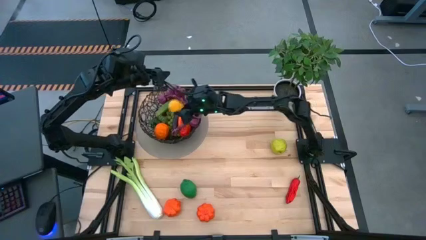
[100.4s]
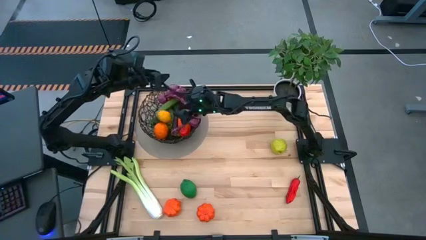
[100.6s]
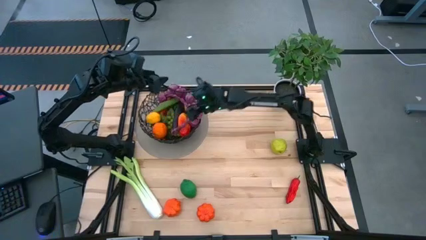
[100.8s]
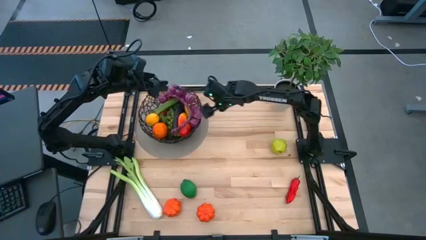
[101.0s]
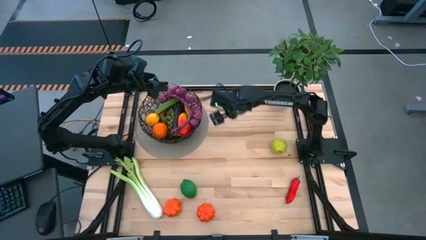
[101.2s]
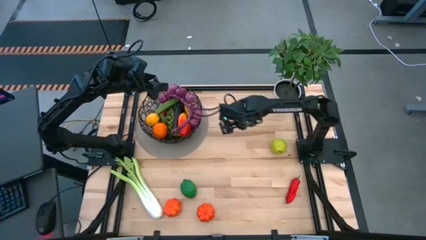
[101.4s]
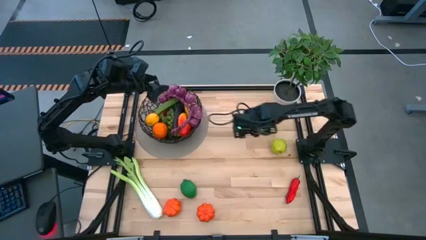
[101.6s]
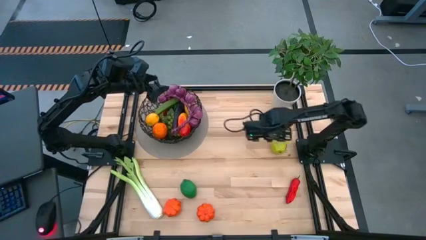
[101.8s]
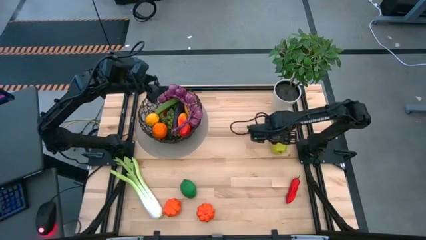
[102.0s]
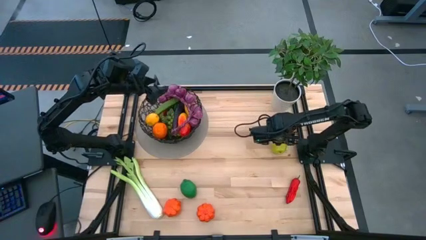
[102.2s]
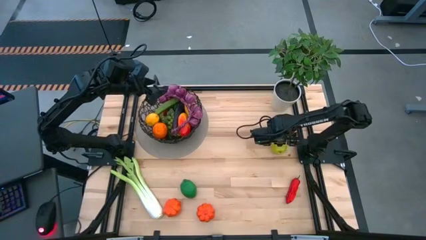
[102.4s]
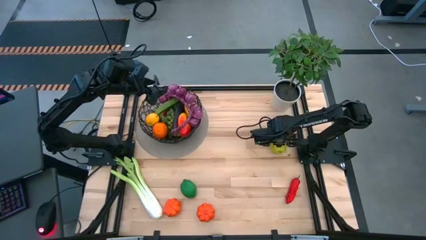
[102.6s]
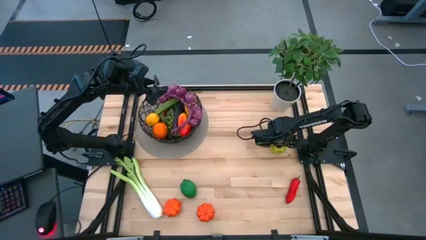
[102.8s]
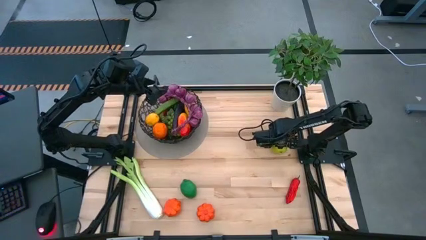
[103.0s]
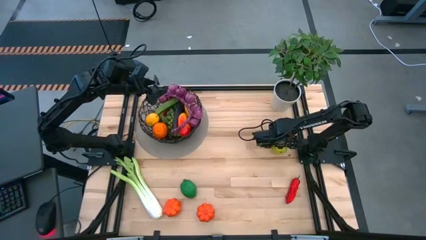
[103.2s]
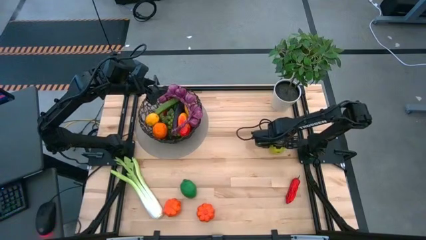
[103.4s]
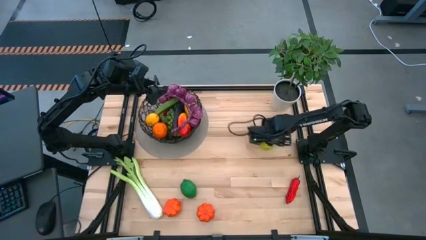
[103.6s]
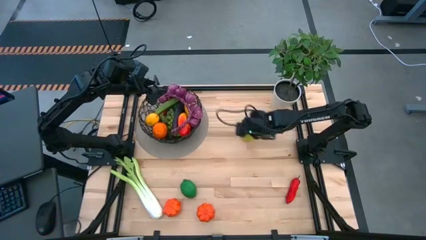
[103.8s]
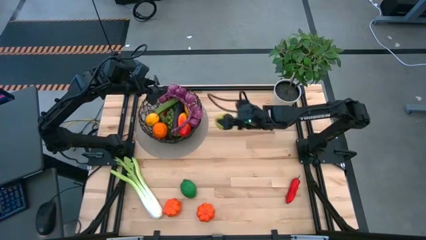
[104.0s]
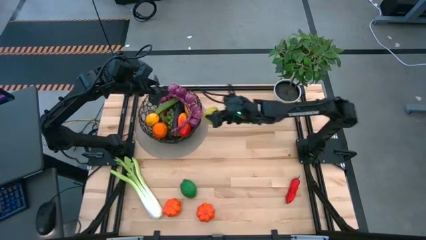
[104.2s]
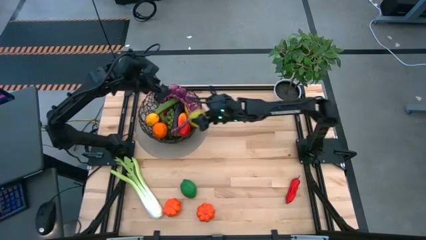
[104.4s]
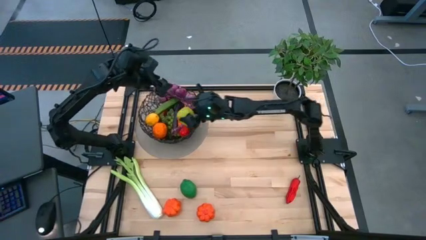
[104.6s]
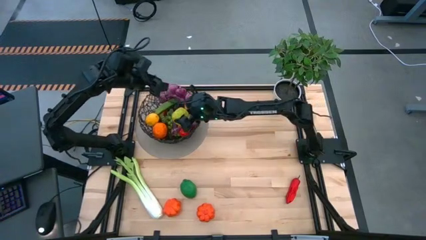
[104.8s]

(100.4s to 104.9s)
Task: Build produce basket
Put the green apple into the black wire basket

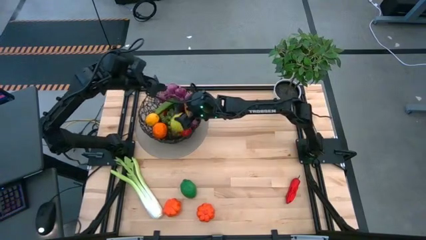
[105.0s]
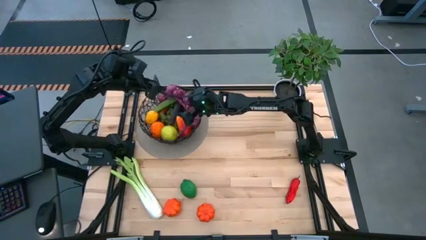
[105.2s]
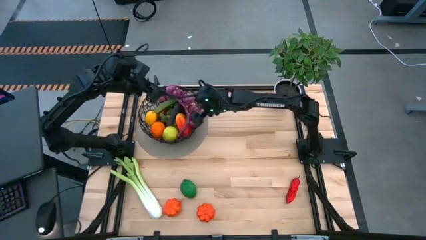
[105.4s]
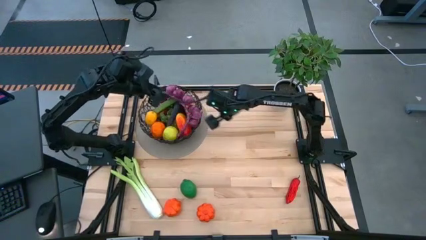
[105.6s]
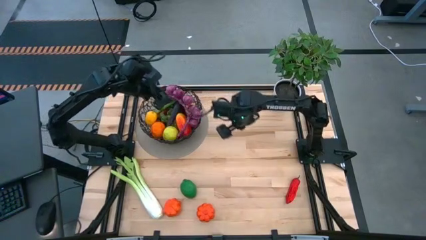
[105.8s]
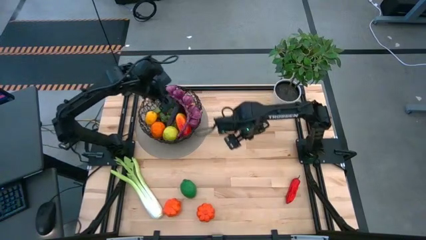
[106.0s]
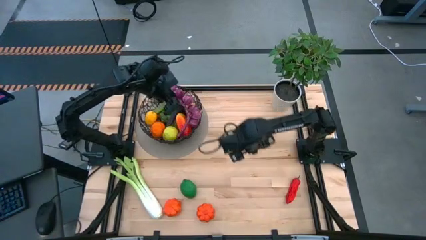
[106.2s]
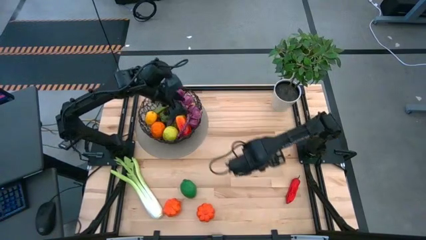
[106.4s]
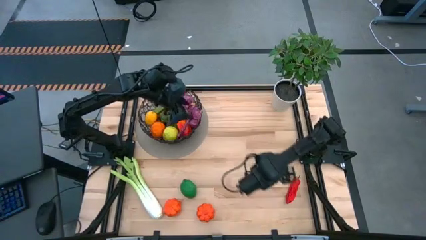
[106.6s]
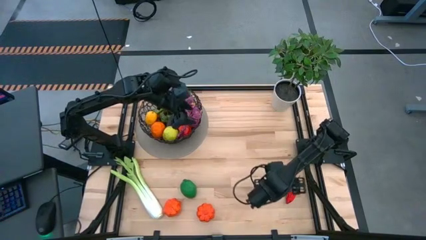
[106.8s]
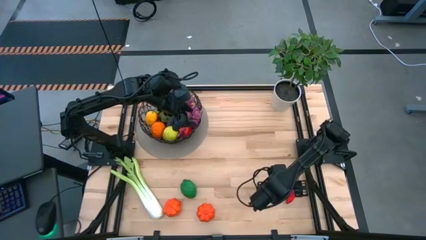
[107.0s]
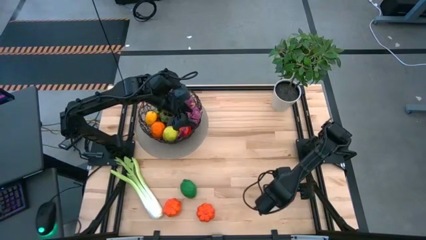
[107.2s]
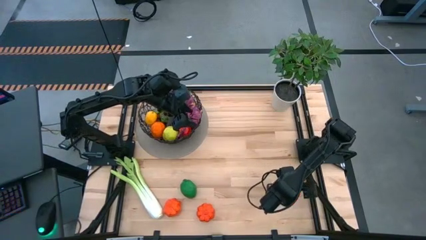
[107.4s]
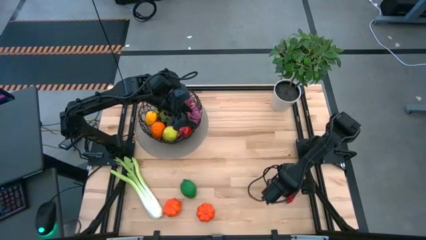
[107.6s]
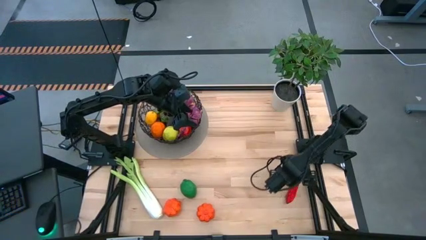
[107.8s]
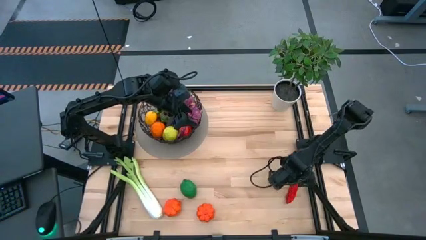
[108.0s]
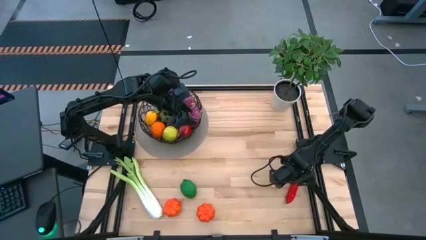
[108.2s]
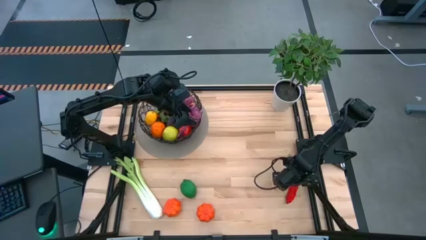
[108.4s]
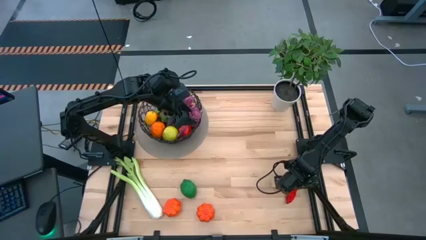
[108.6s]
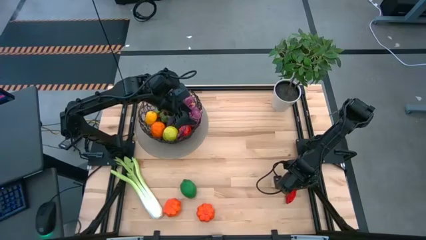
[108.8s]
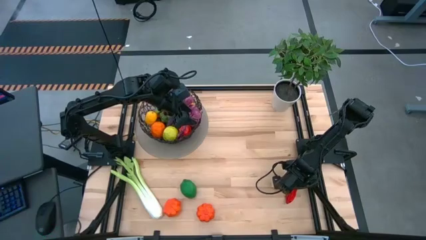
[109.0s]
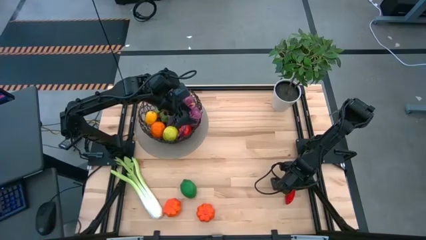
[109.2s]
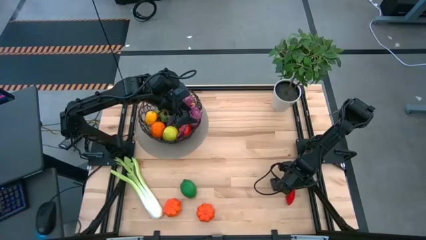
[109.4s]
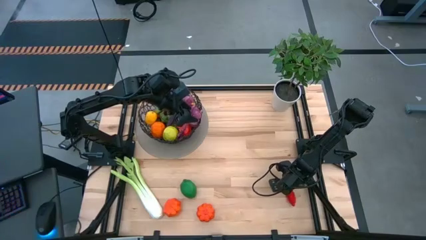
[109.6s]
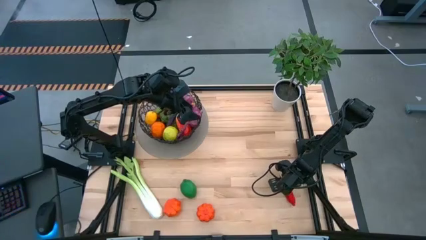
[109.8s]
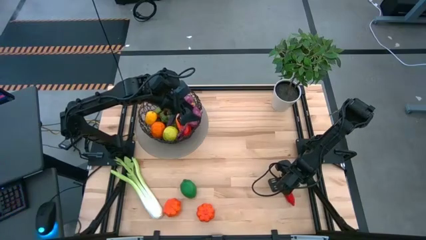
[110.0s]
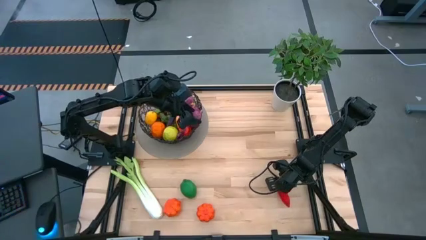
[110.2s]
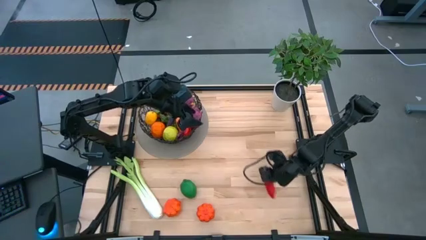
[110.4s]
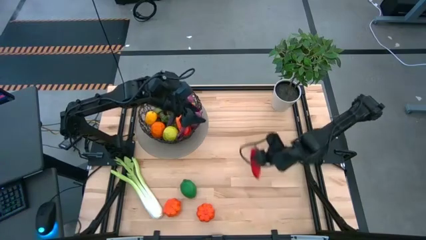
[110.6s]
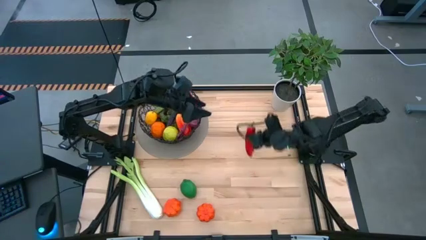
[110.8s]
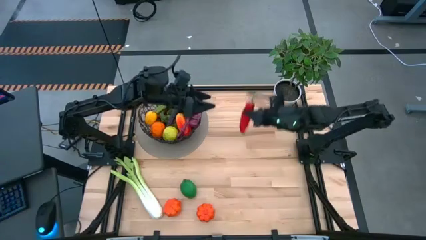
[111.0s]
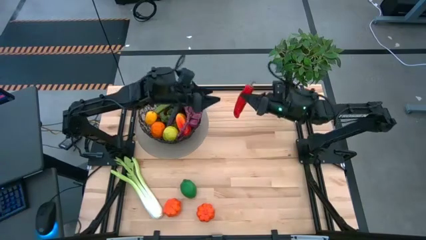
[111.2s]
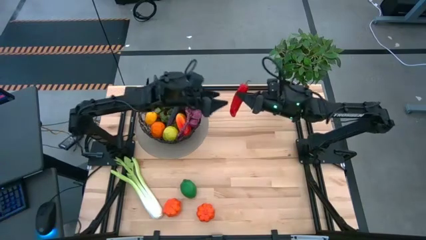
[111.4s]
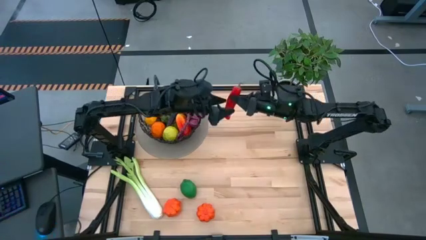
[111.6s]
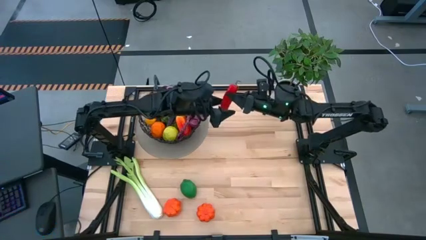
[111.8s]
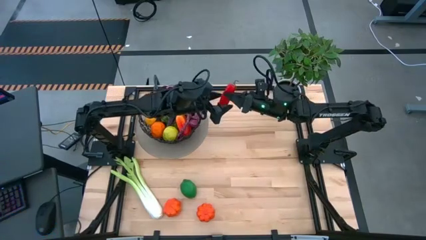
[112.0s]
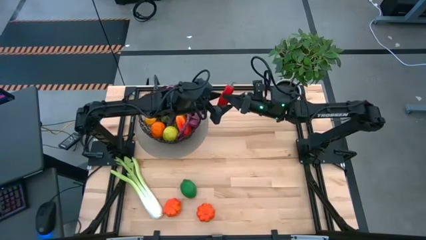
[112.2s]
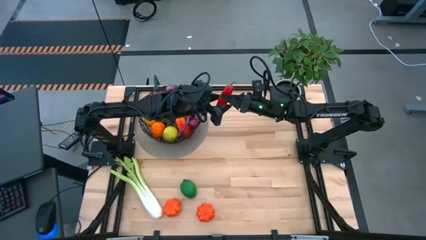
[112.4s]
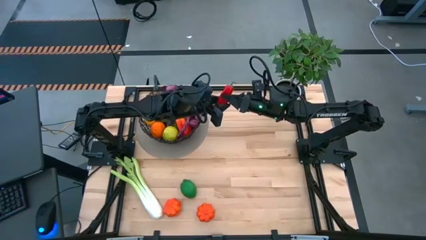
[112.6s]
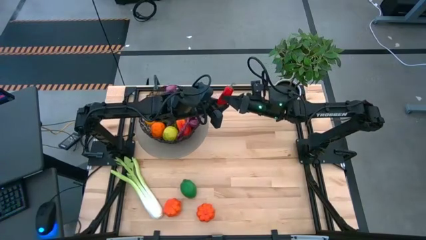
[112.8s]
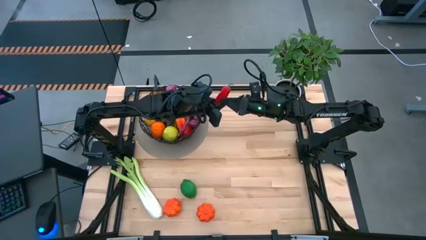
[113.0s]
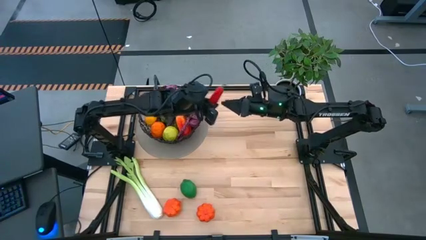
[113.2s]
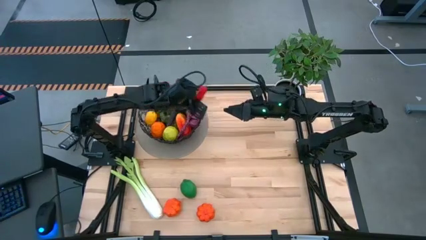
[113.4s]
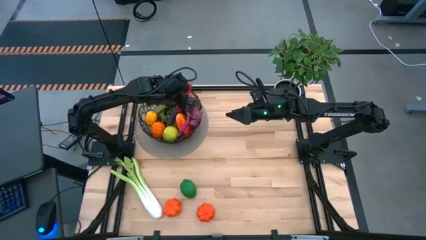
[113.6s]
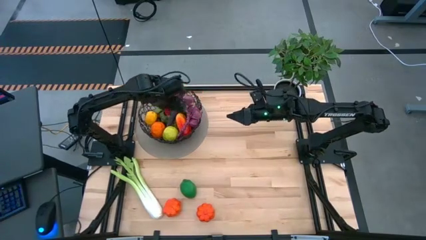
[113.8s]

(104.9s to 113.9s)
Put the red chili pepper into the black wire basket

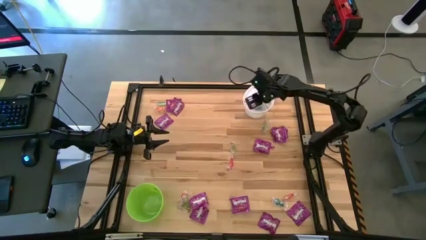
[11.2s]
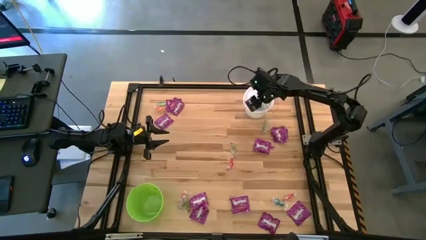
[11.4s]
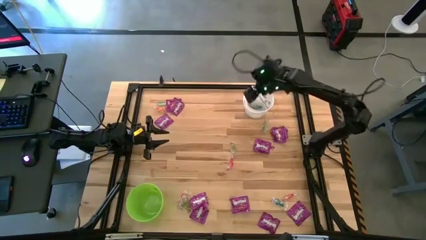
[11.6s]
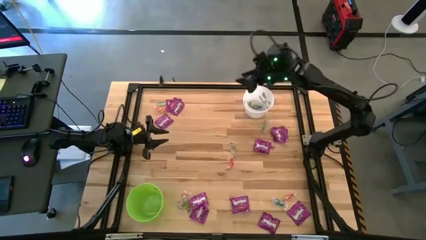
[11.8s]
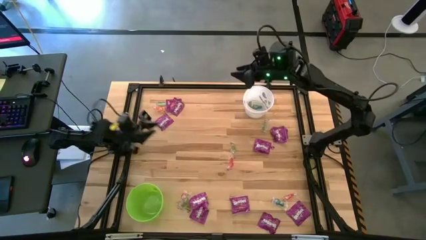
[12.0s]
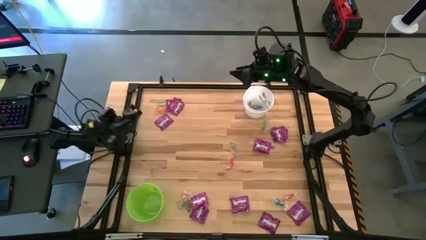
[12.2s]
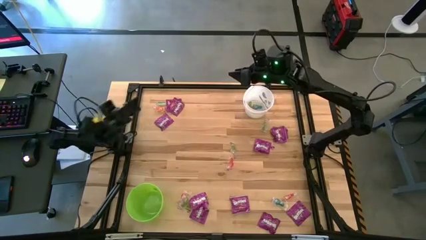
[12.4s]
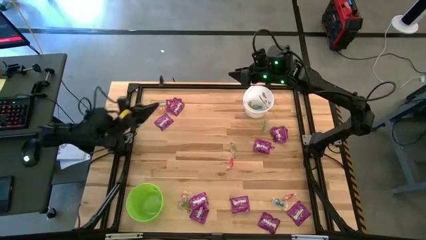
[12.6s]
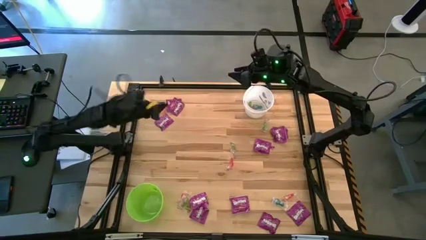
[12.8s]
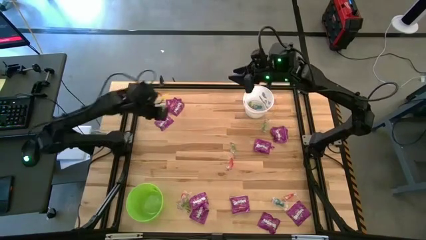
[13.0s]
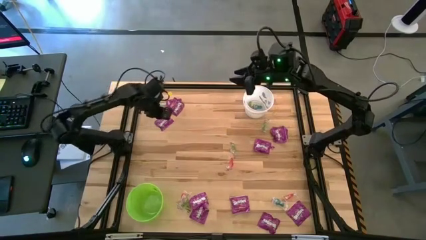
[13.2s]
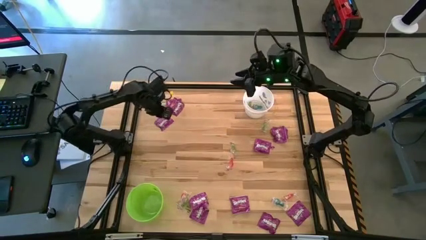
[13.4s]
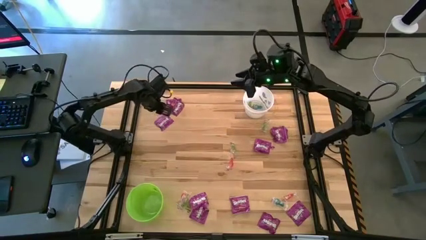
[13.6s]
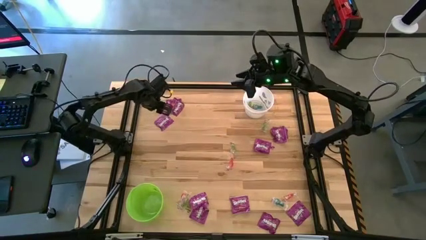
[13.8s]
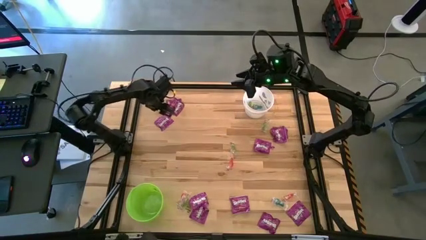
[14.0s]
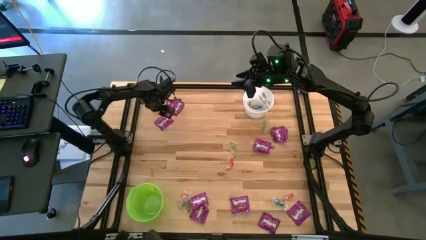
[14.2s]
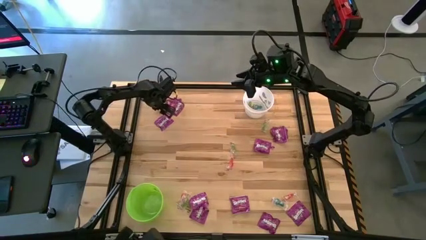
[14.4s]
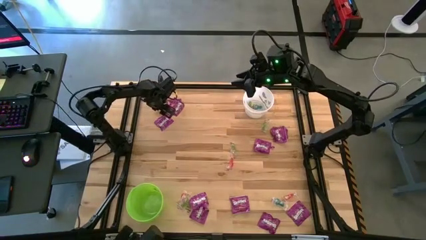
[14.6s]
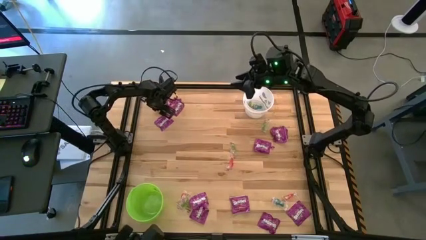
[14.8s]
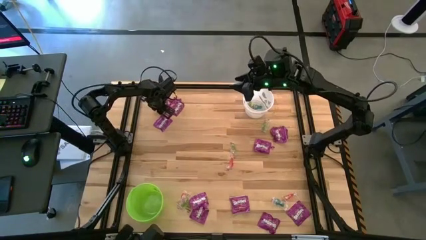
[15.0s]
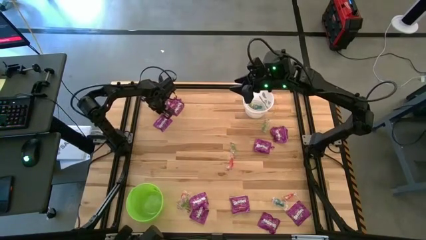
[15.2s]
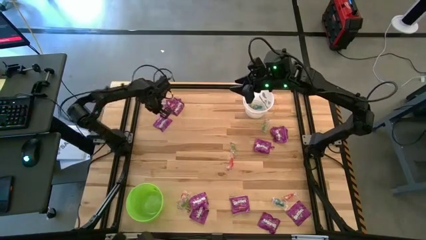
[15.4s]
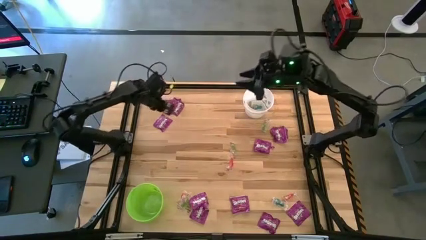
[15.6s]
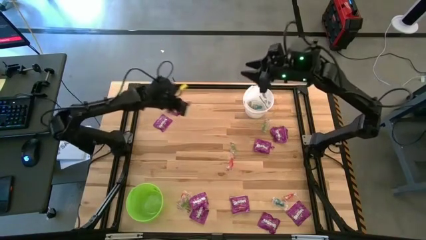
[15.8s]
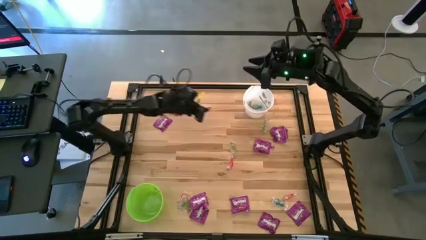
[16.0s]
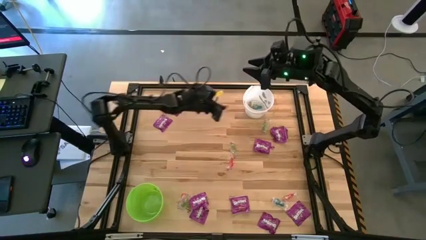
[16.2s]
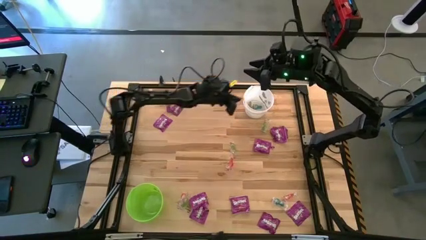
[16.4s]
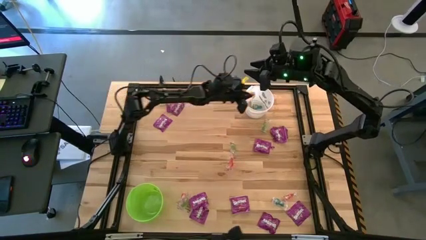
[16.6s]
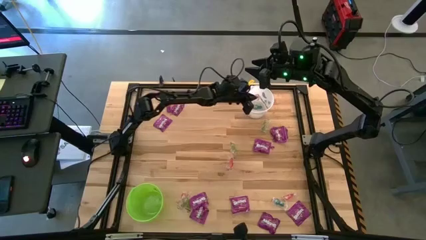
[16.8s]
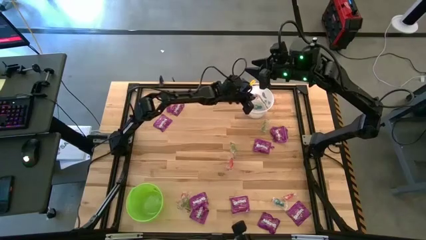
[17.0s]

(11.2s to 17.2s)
Task: Sort candy by brand, put in halloween buckets
Put the orange gummy into the white bucket
